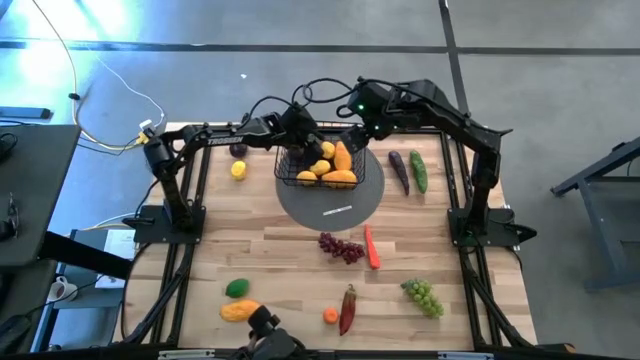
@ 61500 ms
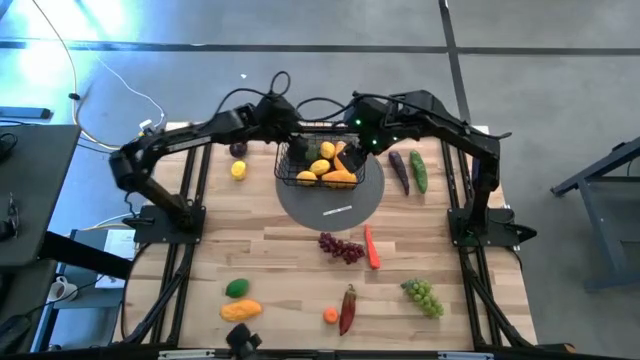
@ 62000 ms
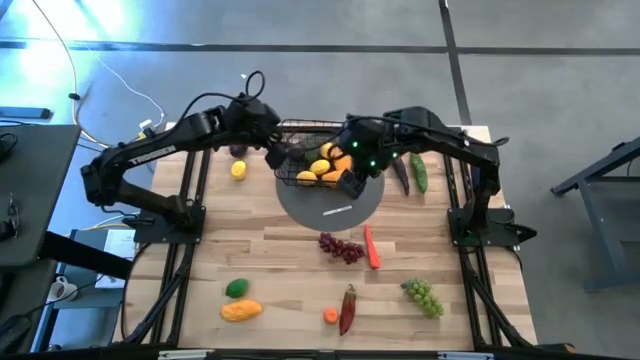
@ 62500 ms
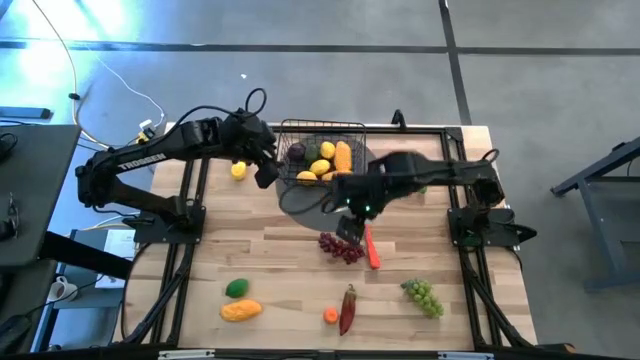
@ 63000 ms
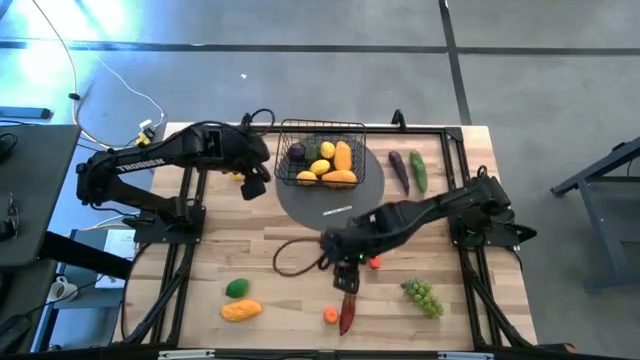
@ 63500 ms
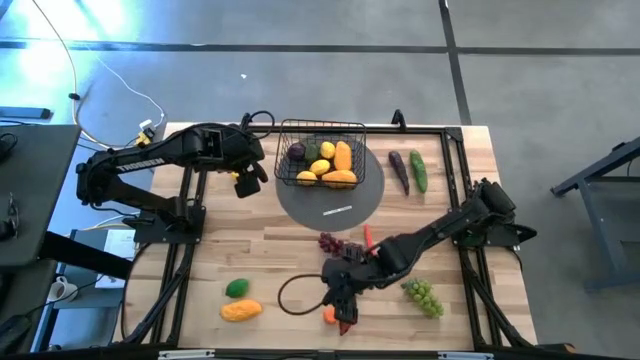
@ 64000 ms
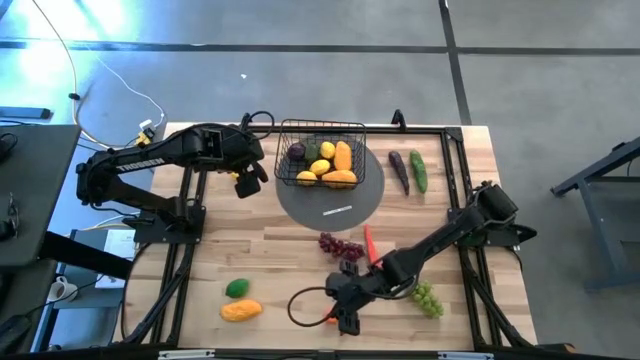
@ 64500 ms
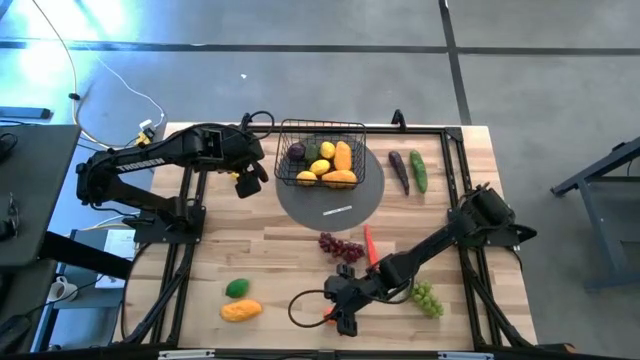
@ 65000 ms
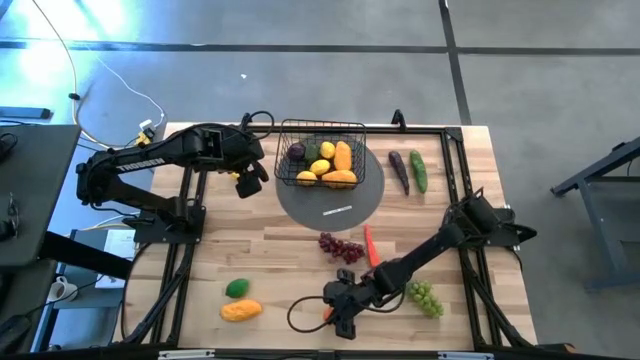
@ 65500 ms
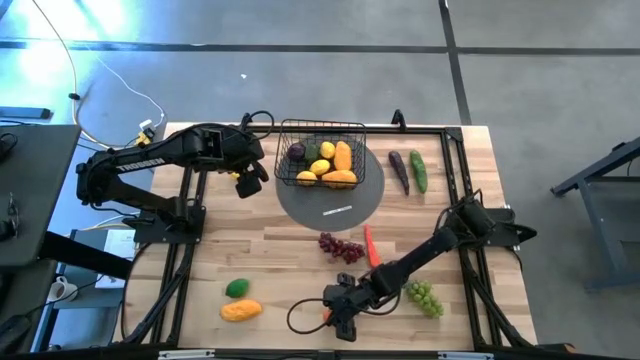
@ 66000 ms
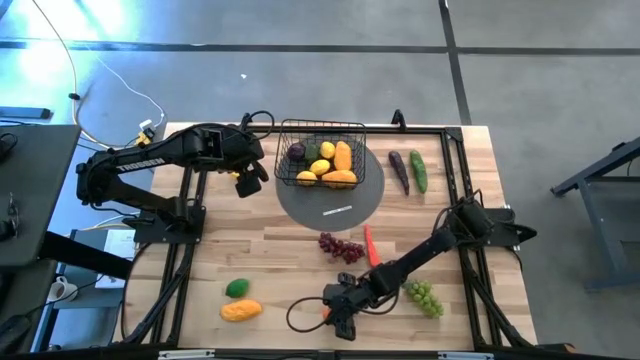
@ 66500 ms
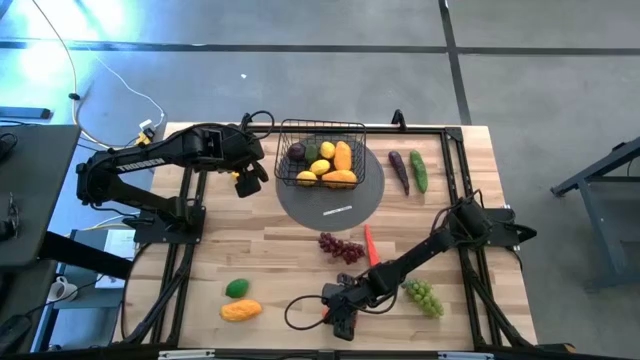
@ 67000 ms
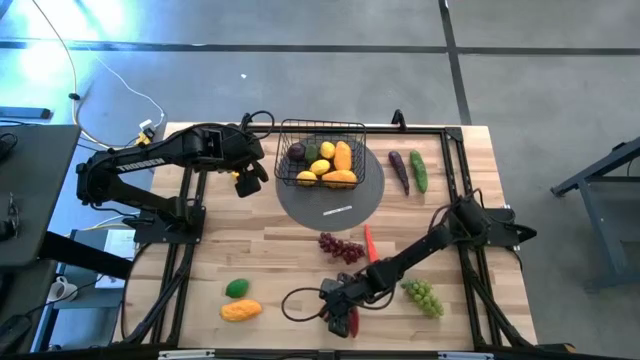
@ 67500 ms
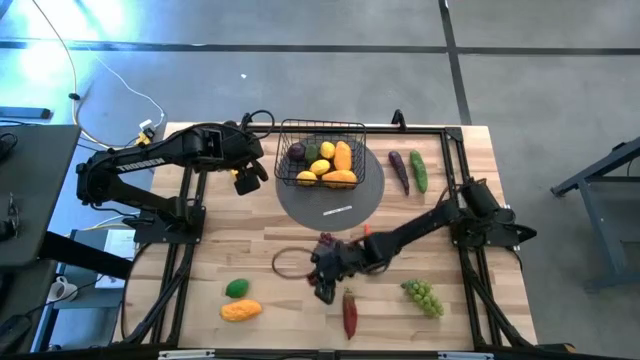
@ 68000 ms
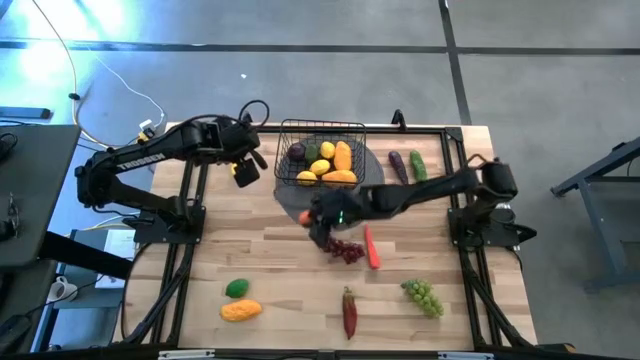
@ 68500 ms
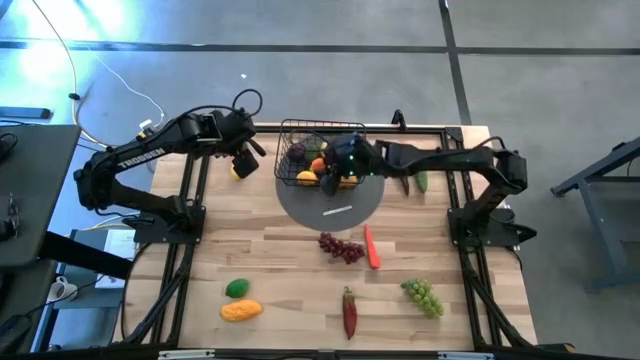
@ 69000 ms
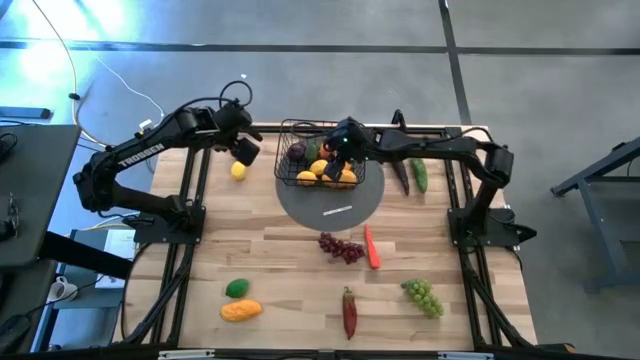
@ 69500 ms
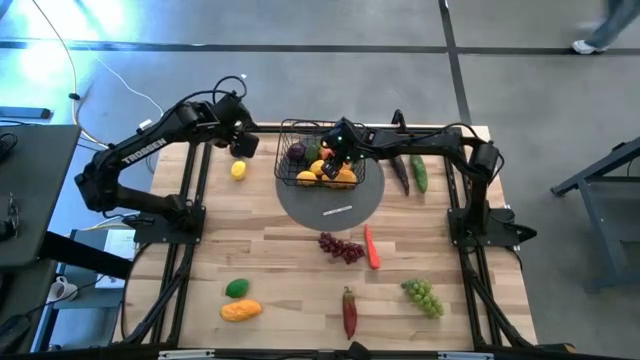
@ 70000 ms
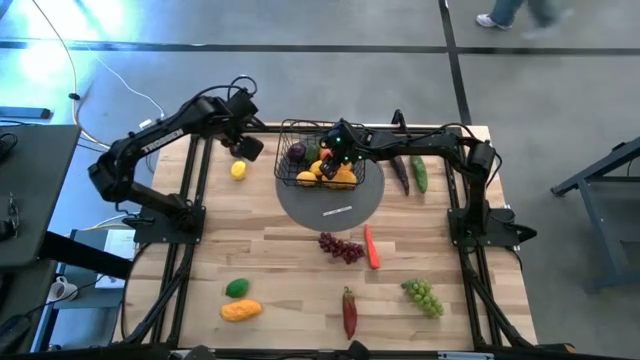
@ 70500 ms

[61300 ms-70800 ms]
Task: Build produce basket
Put the orange into the black wire basket

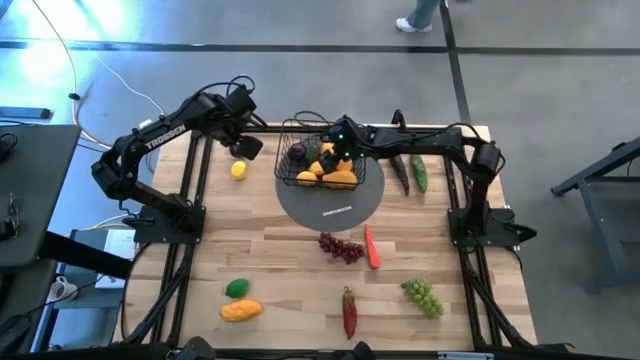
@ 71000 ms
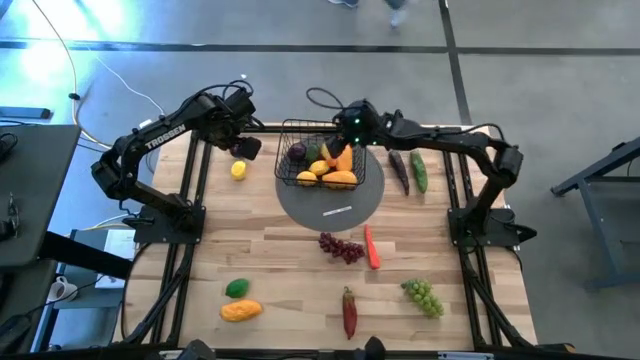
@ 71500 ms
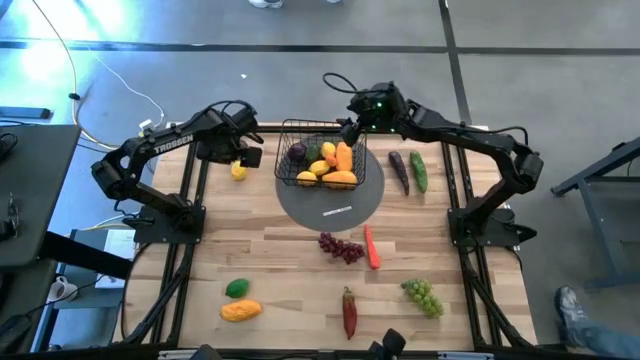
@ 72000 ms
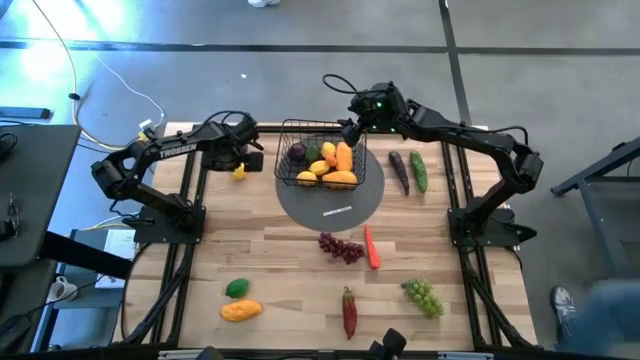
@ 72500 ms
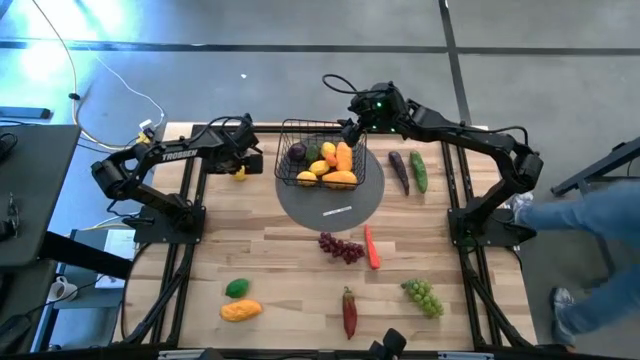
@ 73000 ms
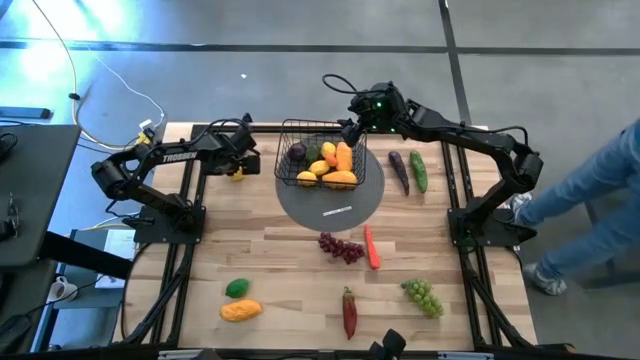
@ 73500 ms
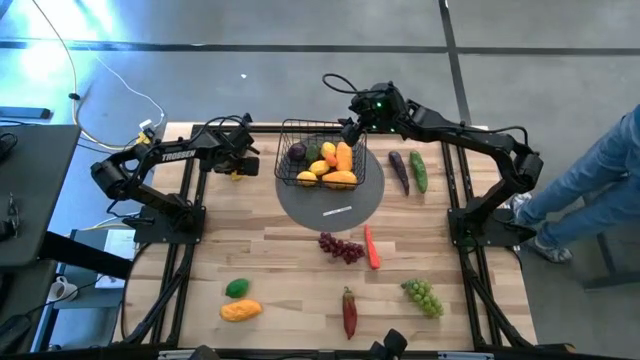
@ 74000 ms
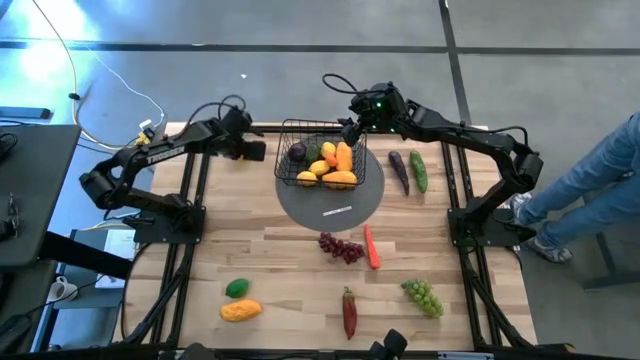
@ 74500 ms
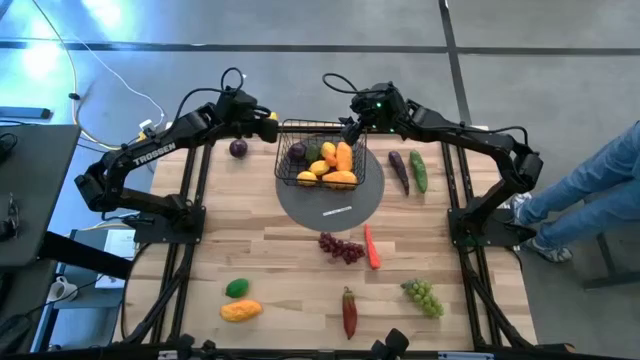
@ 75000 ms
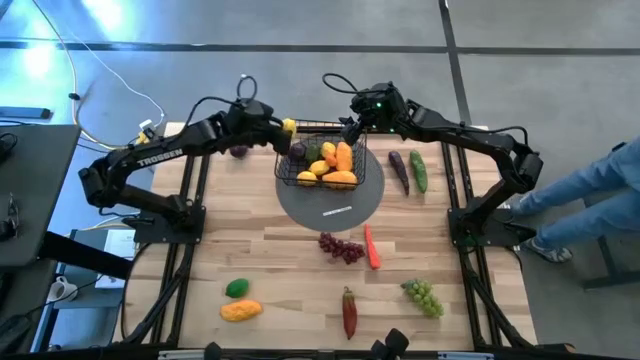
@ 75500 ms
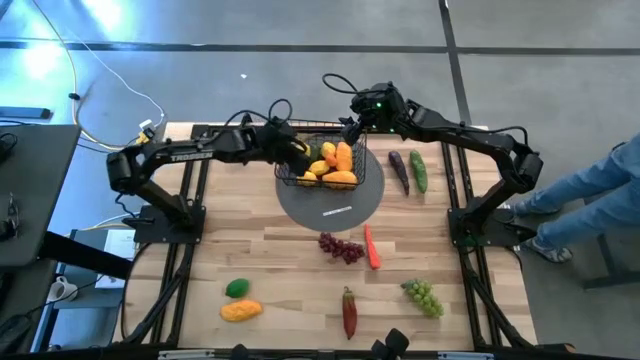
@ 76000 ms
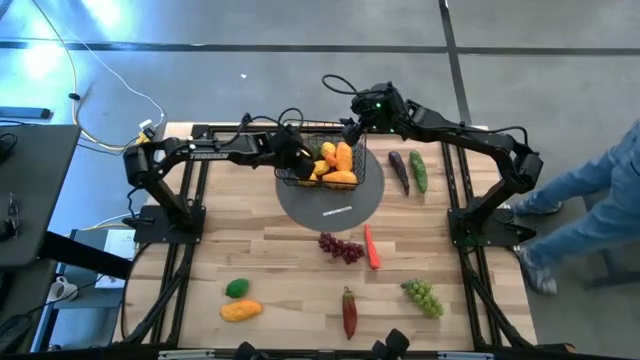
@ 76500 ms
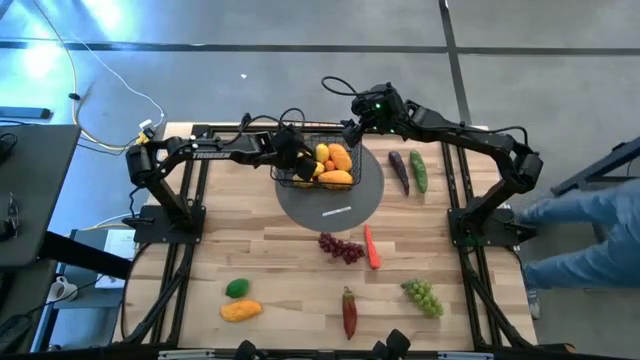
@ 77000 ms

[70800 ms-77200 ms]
Put the yellow lemon into the black wire basket

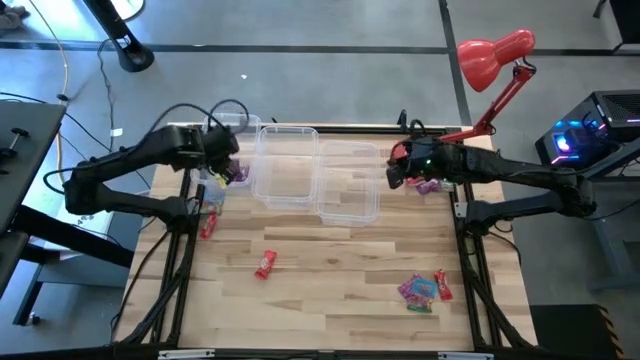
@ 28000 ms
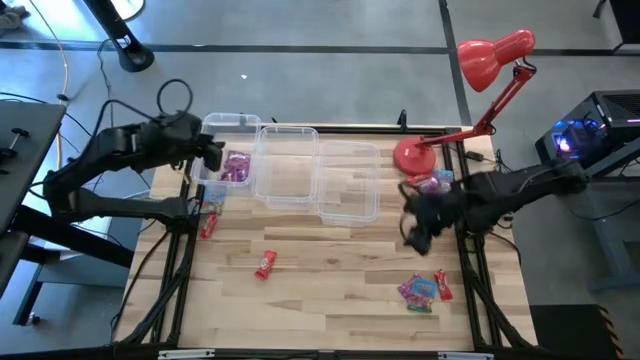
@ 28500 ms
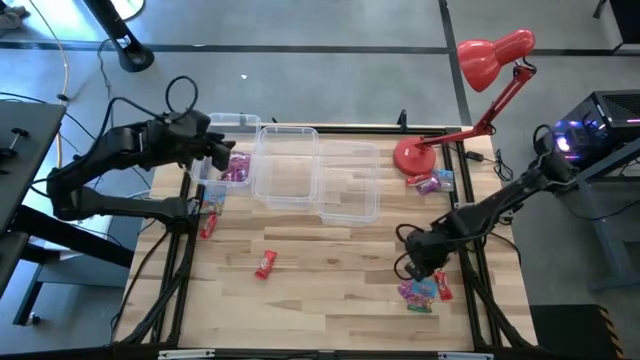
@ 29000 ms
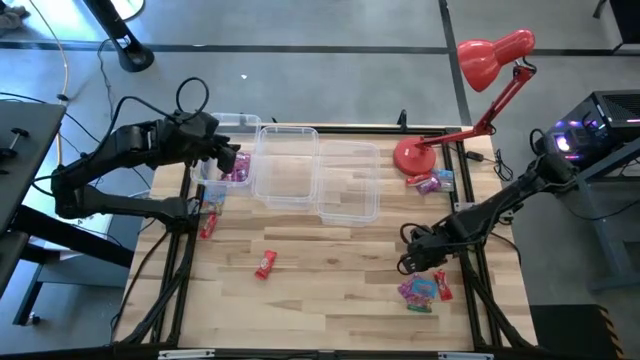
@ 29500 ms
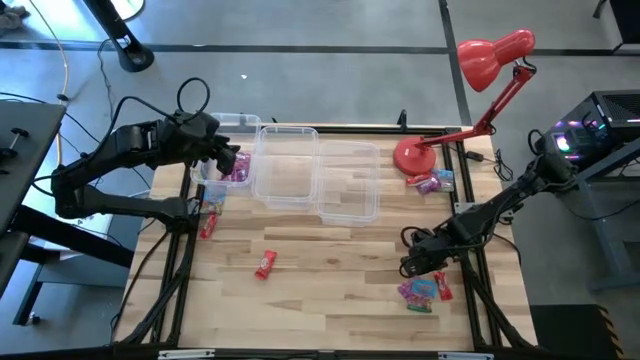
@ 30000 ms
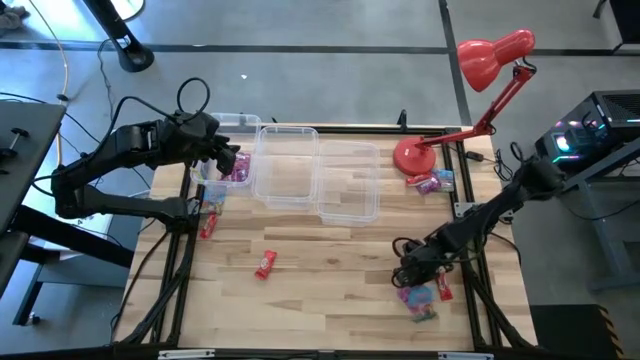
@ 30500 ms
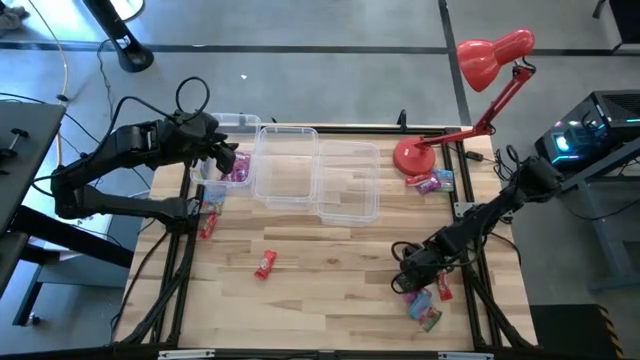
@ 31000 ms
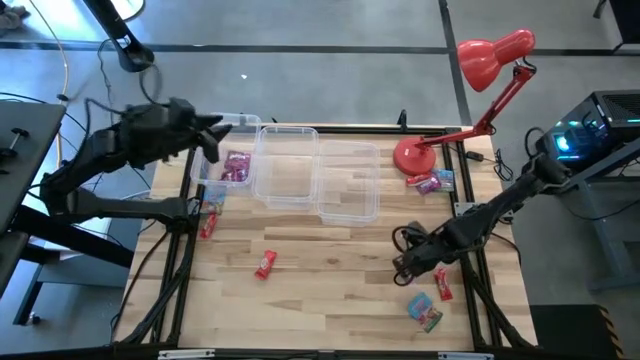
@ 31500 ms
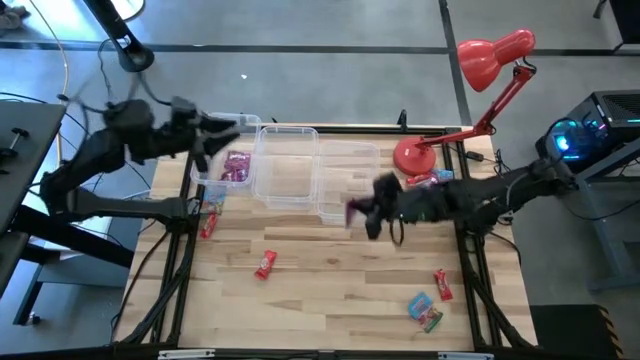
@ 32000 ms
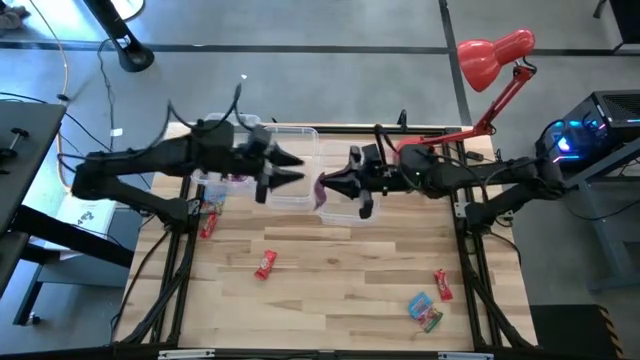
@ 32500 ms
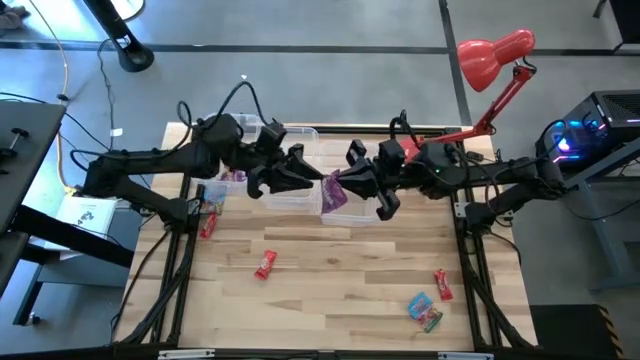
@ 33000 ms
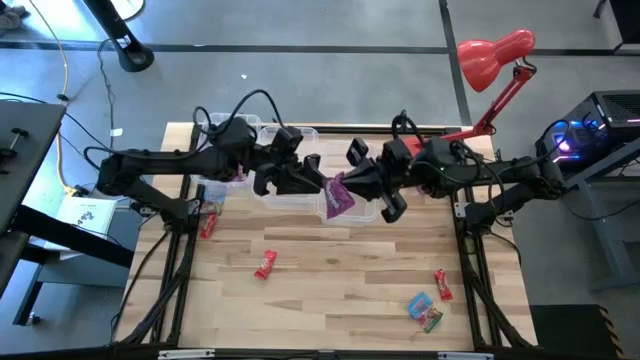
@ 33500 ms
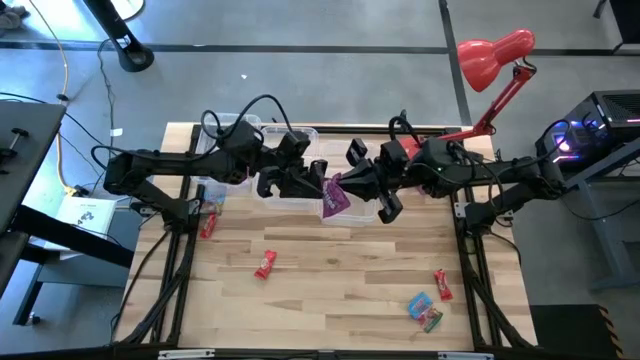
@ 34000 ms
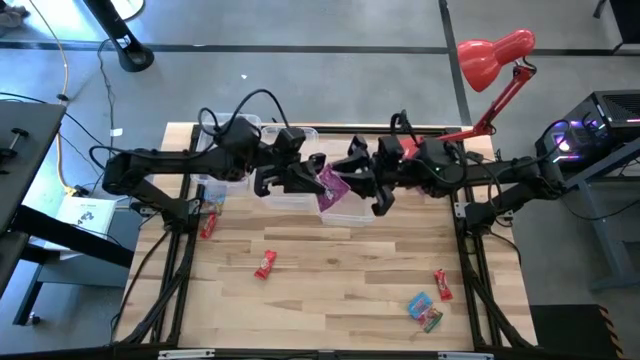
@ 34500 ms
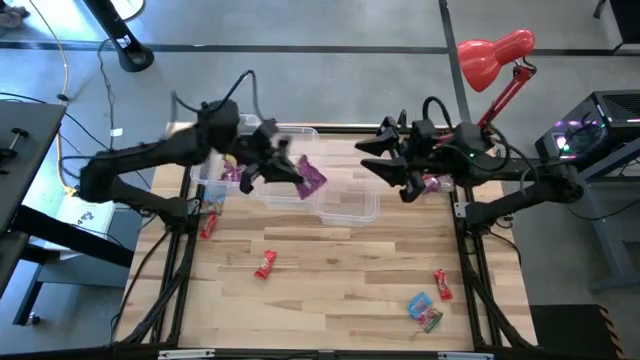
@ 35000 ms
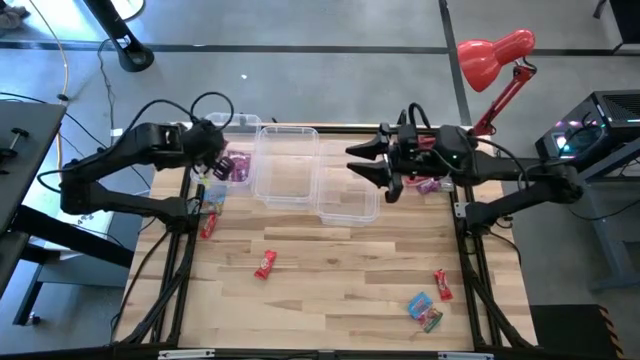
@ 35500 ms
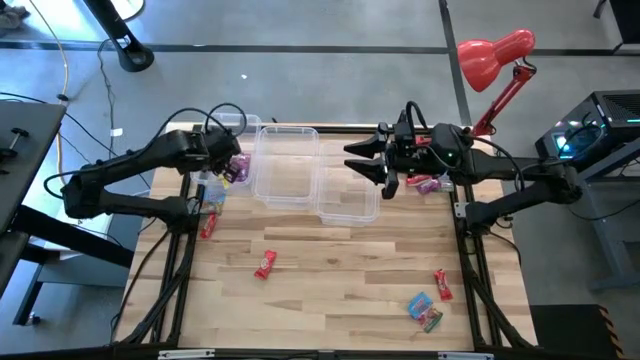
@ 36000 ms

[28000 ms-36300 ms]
Task: Sort candy
Put the violet candy bag into the left transparent bin
